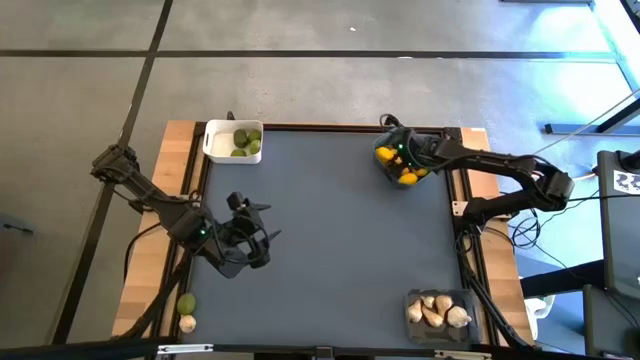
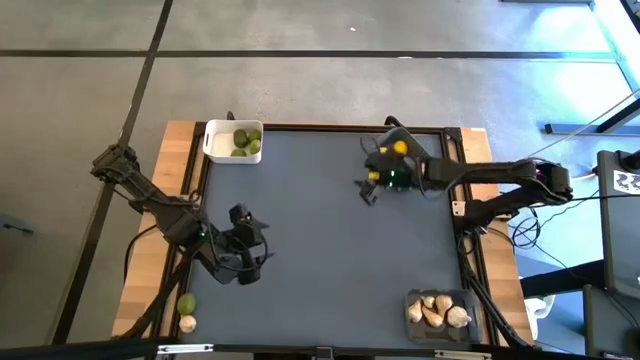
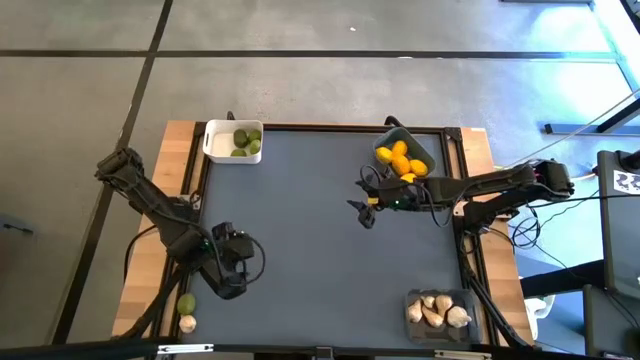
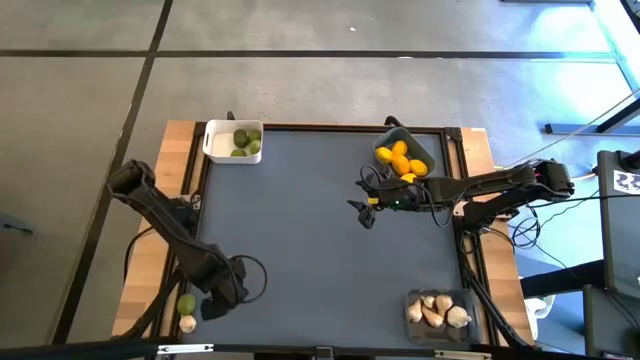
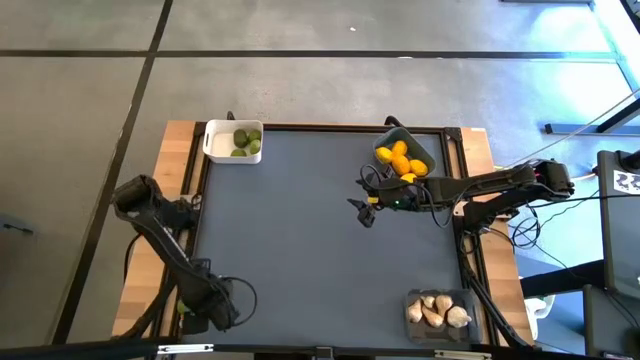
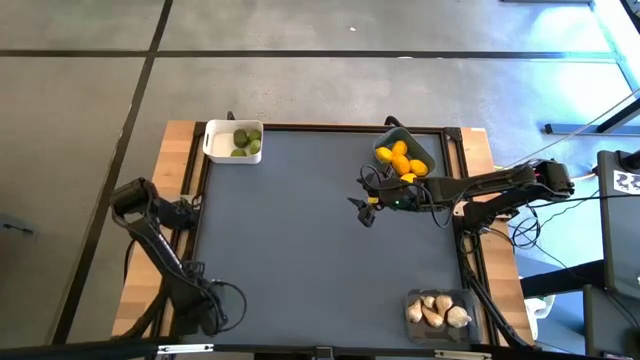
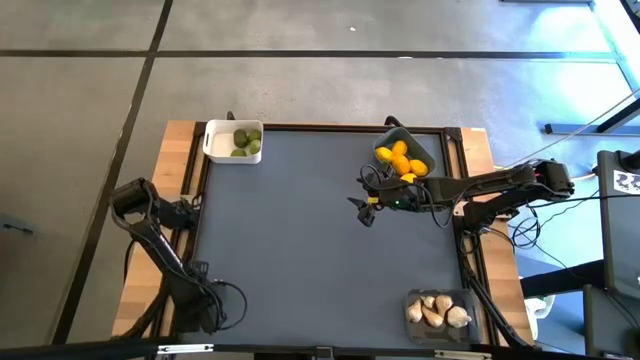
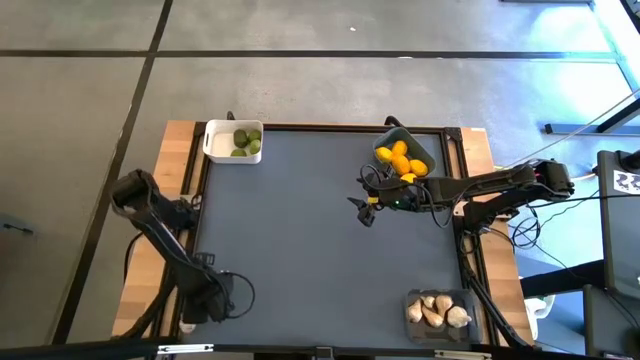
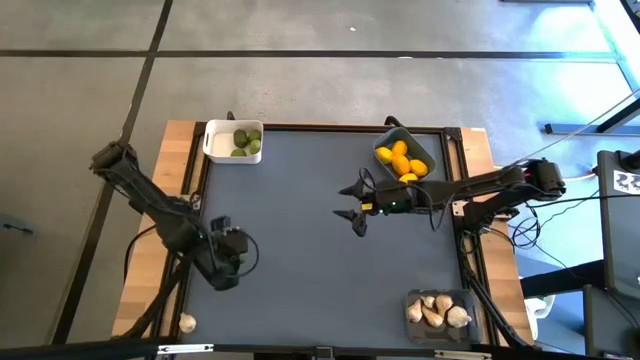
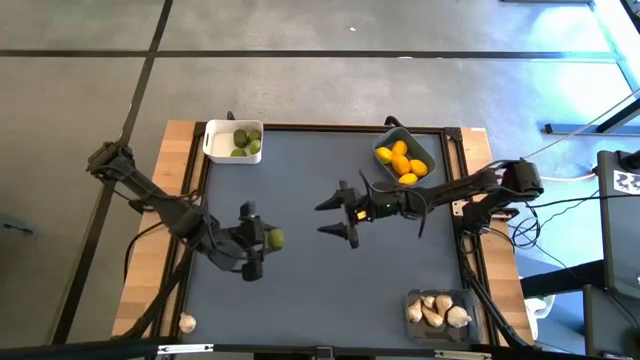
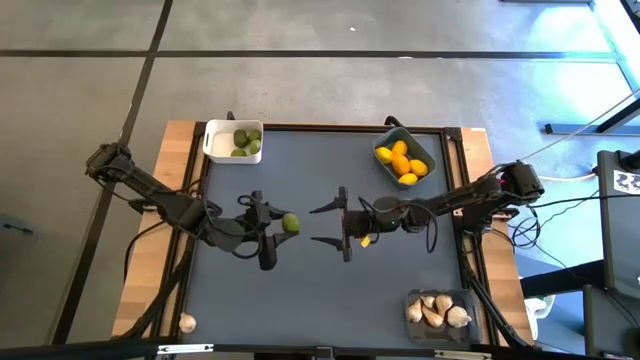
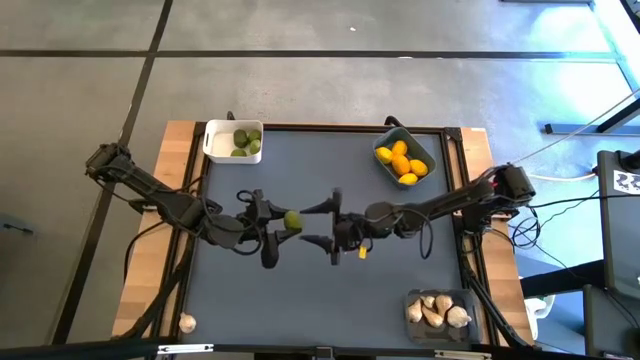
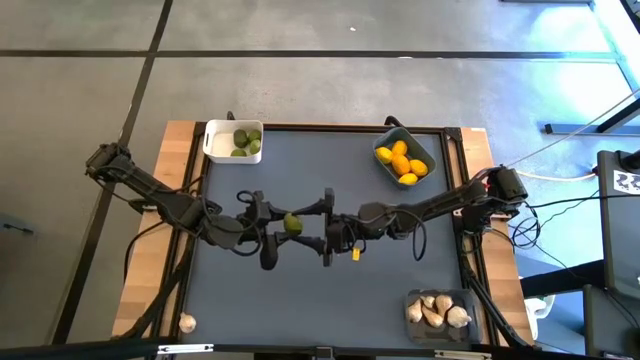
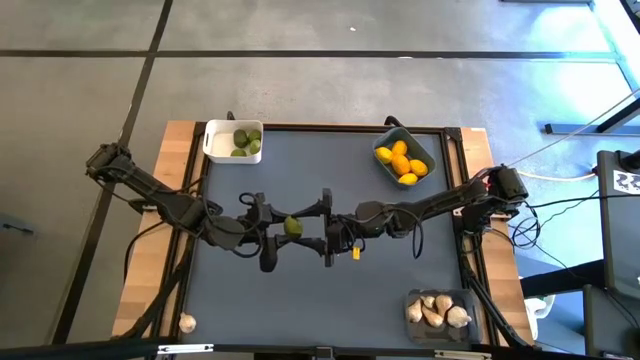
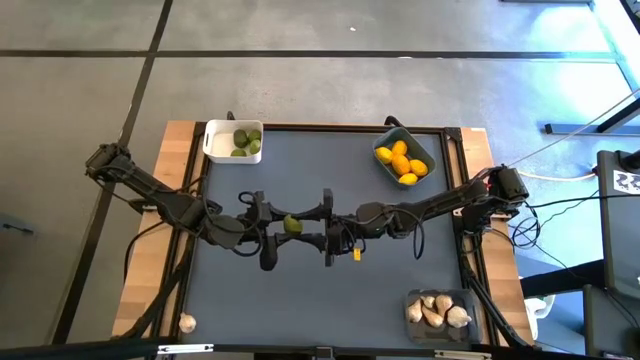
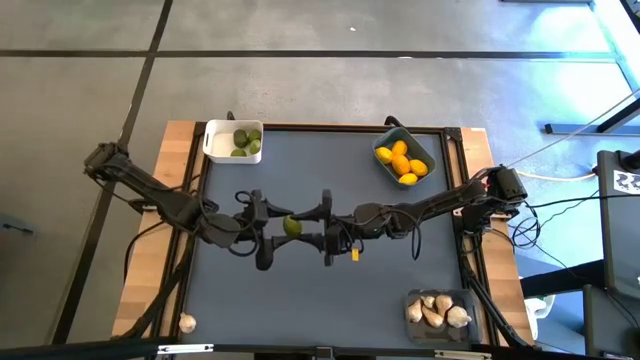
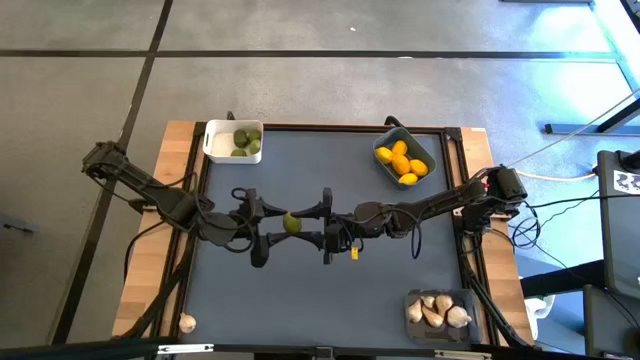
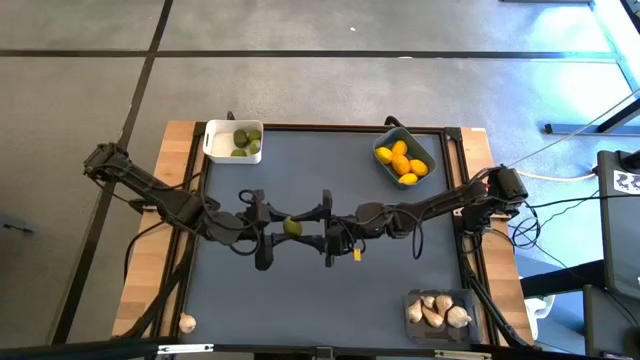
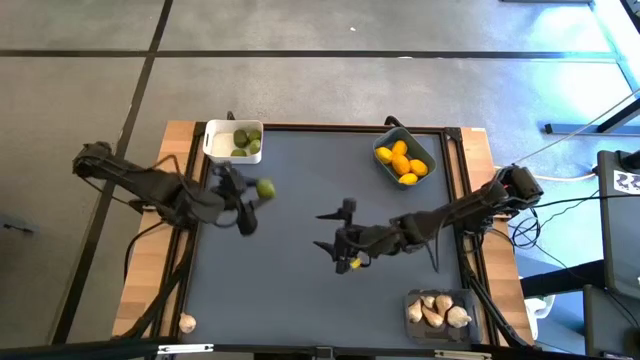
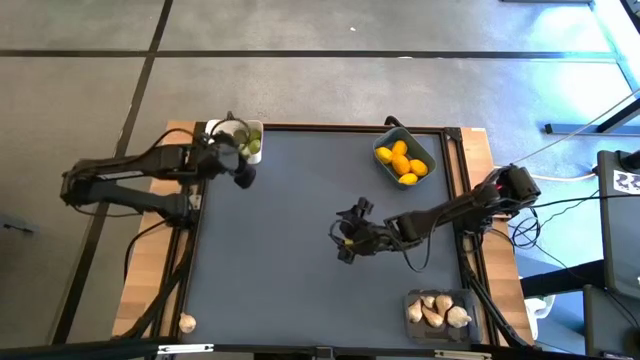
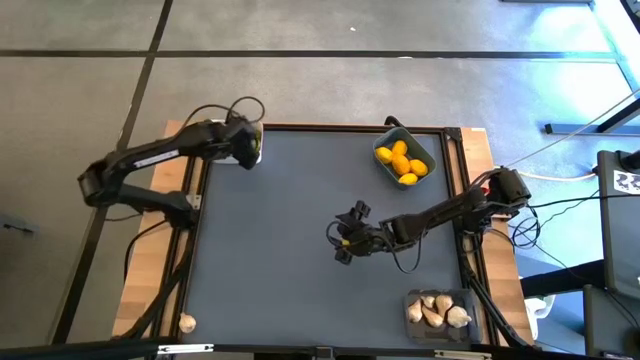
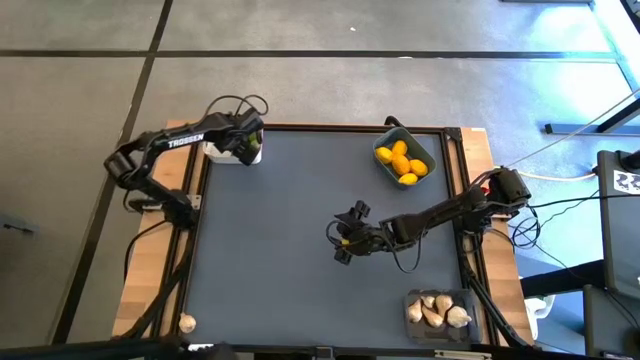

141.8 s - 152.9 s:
Task: Sort produce into baskets
Put the lime into the white bin

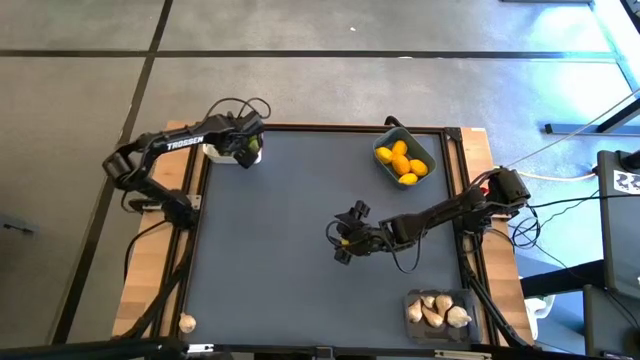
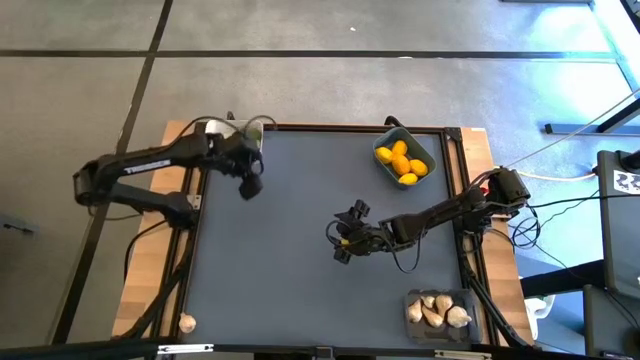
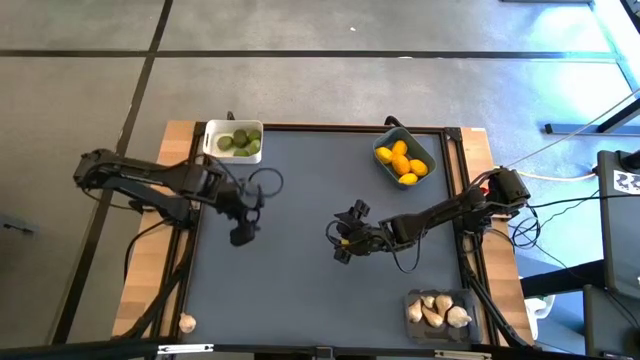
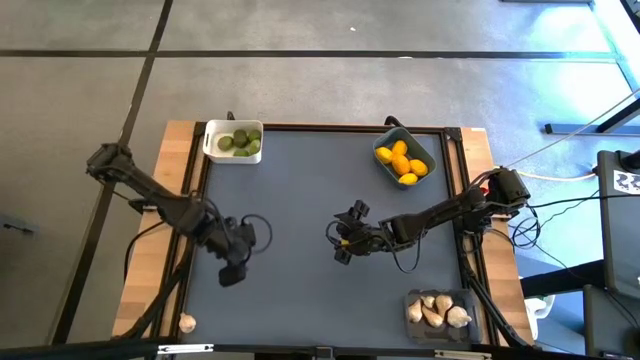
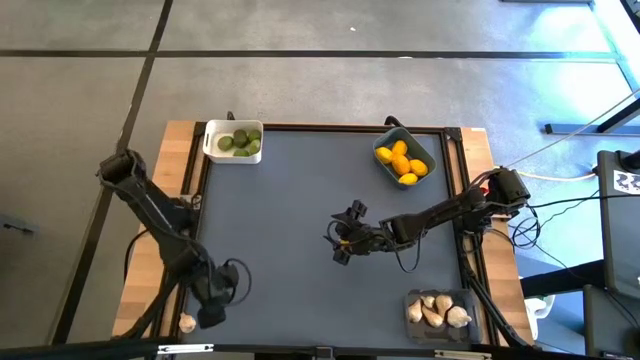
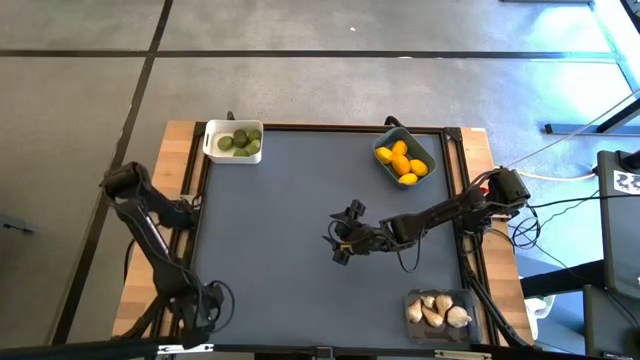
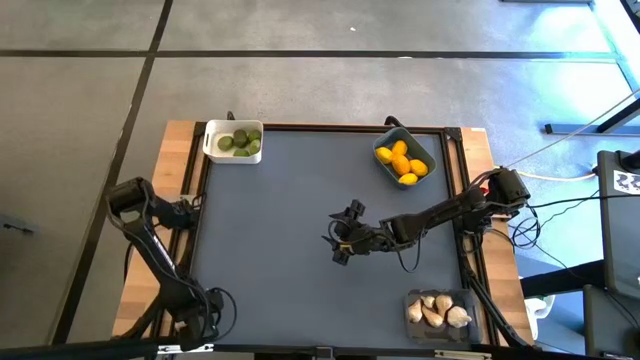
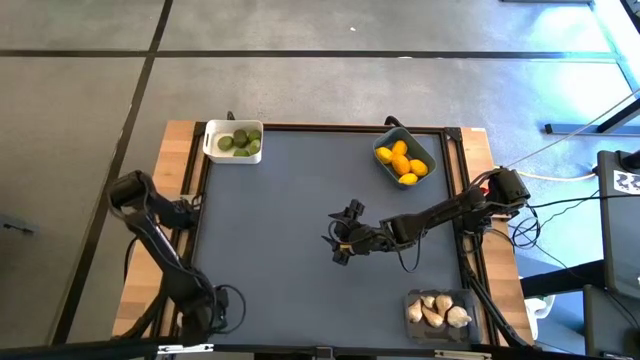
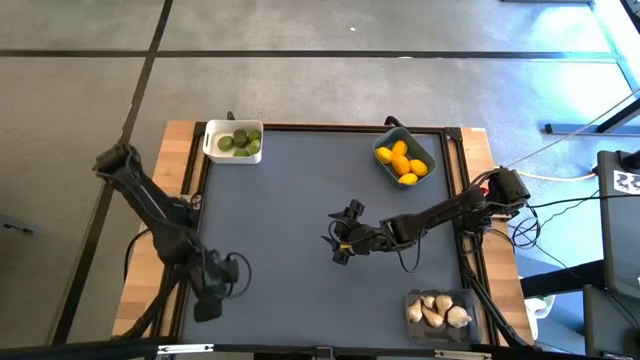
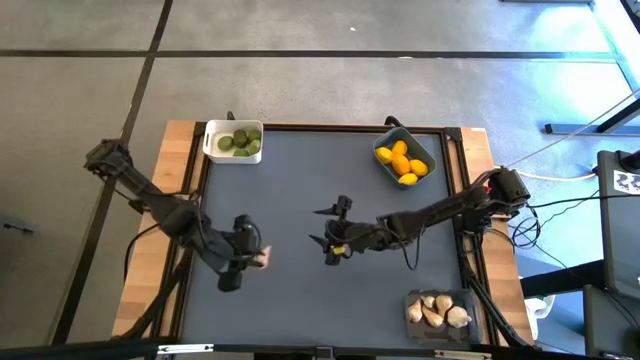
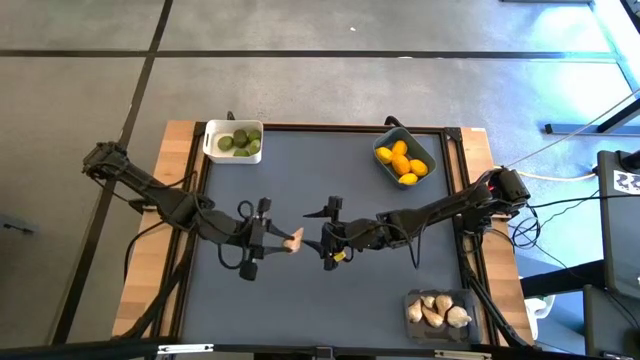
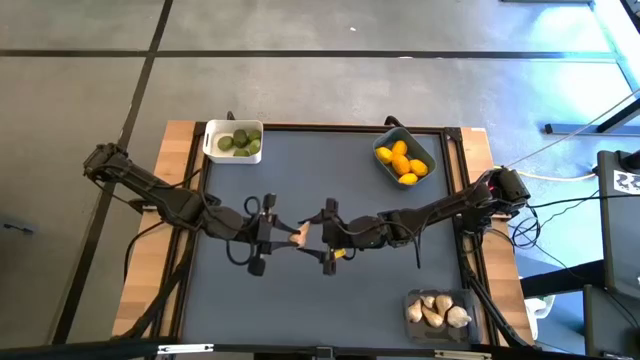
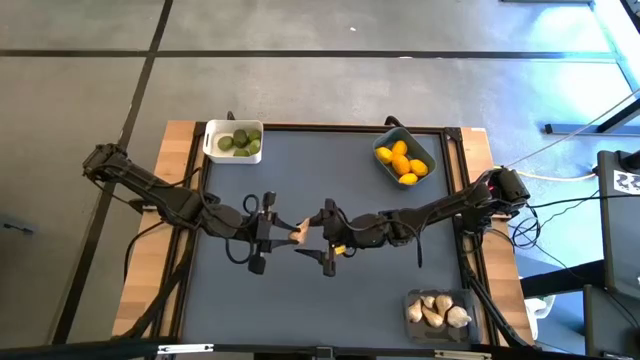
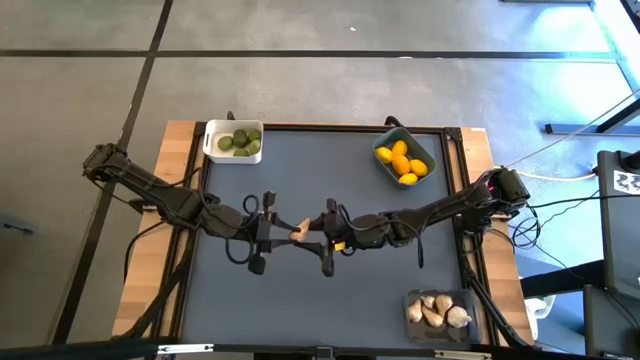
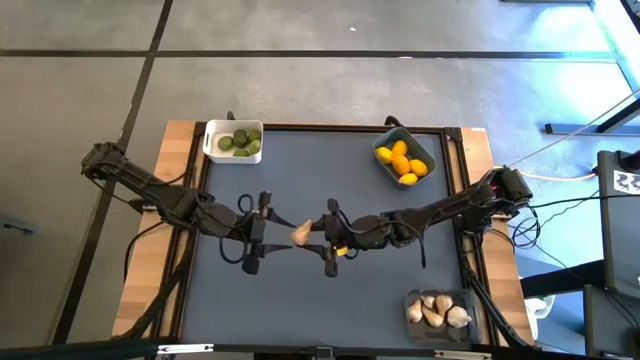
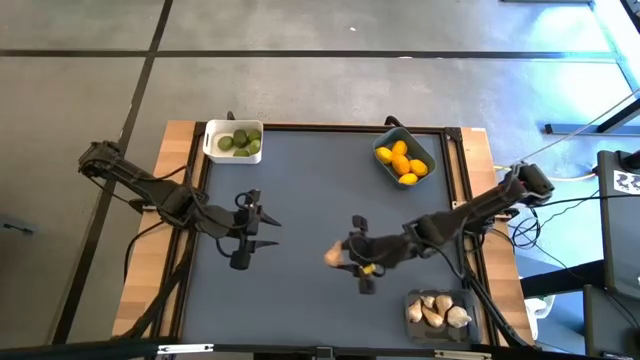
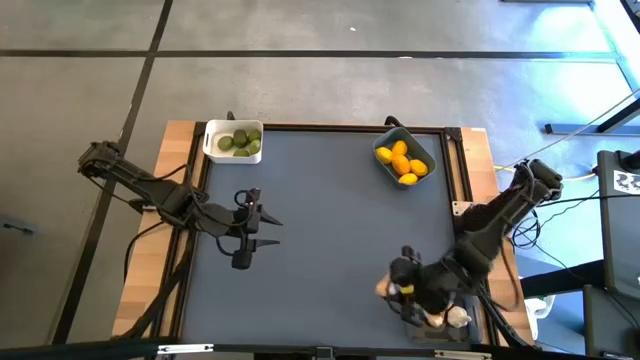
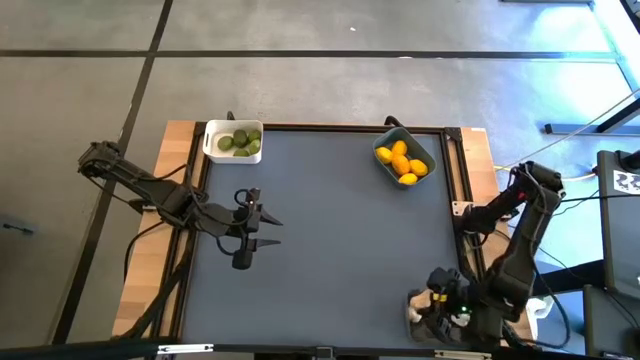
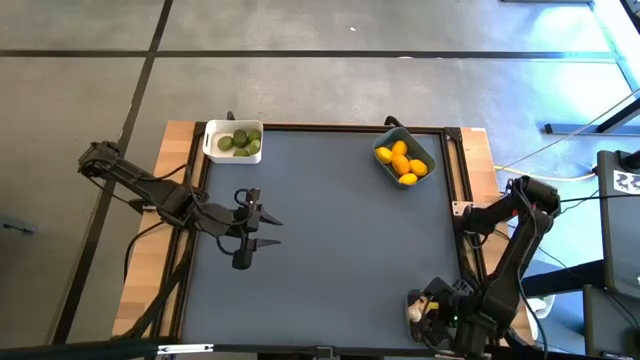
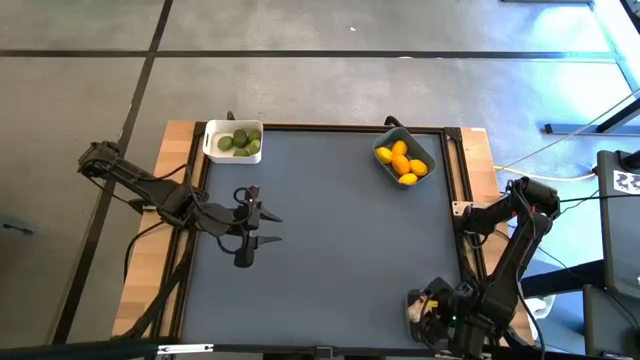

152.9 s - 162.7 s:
Put the white garlic into the black bin
